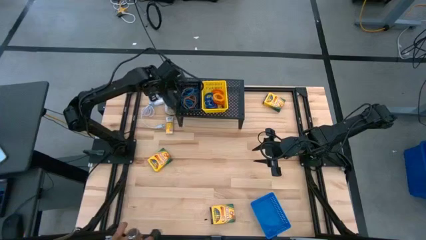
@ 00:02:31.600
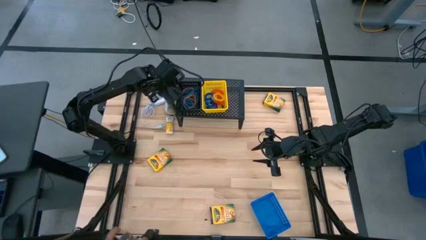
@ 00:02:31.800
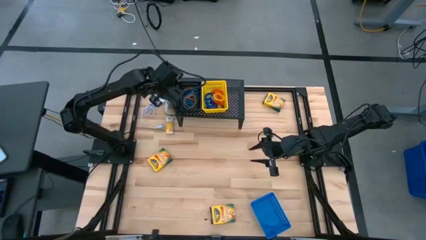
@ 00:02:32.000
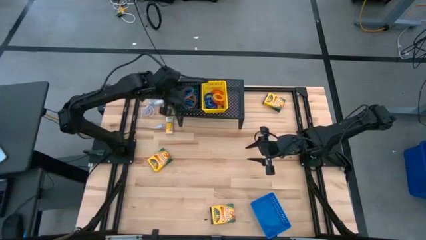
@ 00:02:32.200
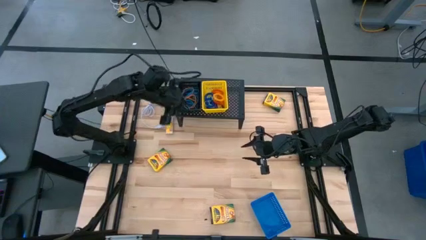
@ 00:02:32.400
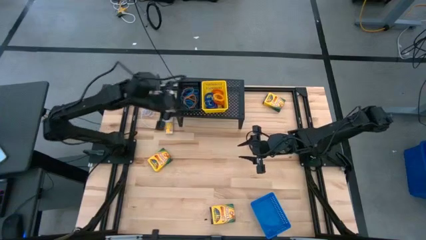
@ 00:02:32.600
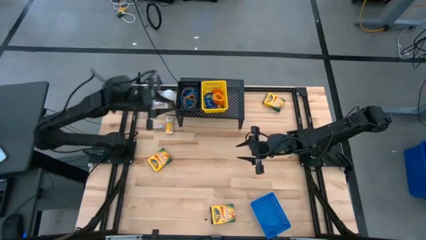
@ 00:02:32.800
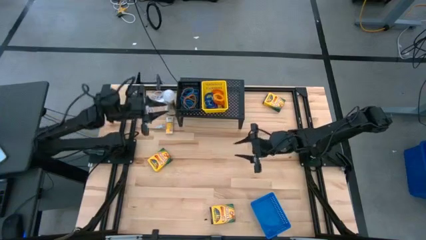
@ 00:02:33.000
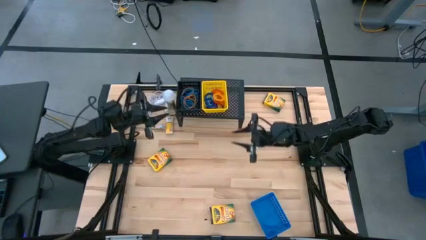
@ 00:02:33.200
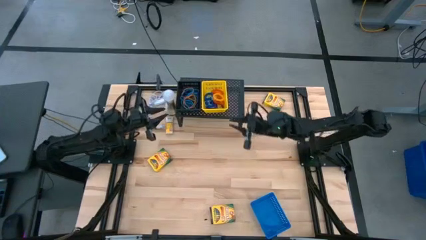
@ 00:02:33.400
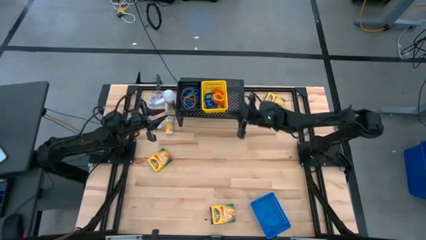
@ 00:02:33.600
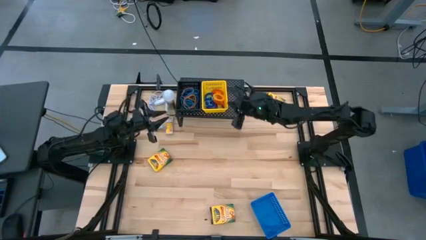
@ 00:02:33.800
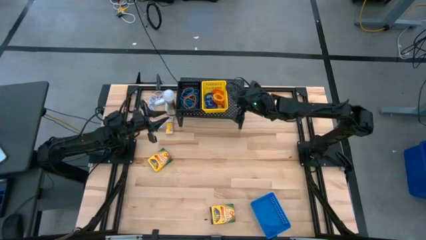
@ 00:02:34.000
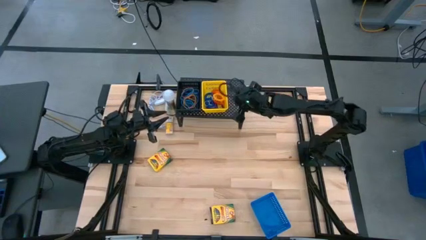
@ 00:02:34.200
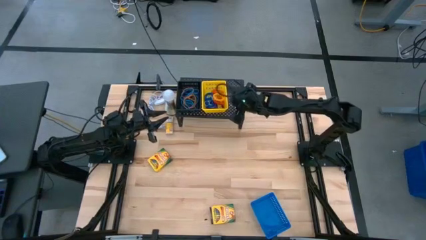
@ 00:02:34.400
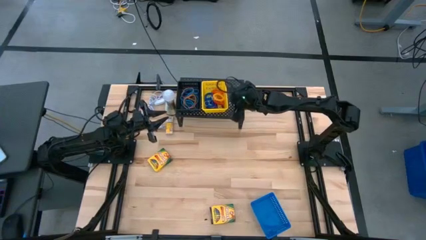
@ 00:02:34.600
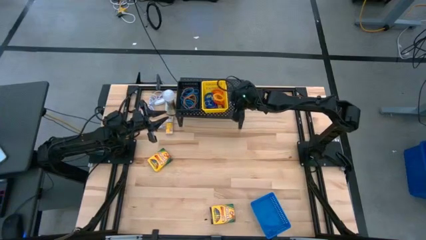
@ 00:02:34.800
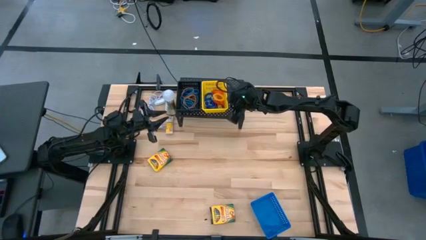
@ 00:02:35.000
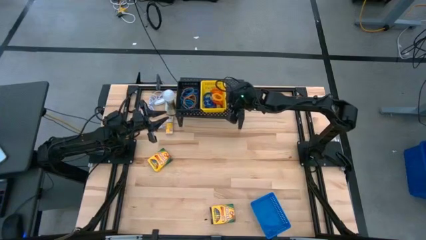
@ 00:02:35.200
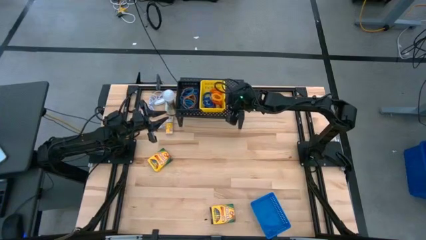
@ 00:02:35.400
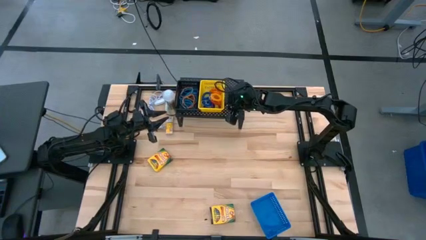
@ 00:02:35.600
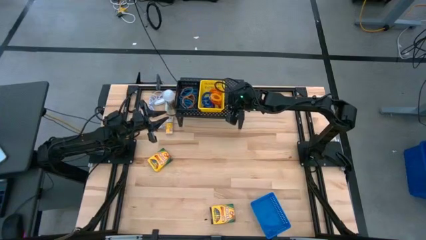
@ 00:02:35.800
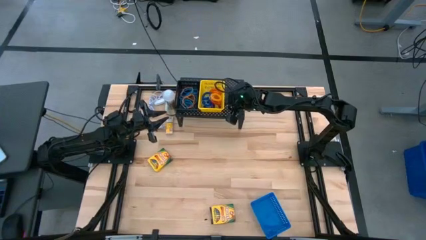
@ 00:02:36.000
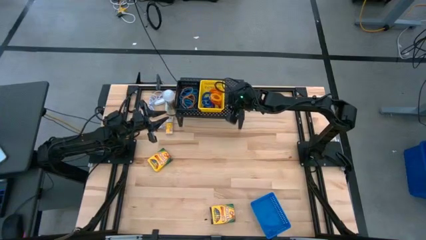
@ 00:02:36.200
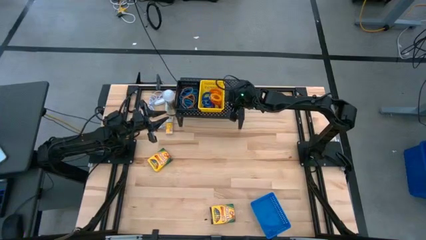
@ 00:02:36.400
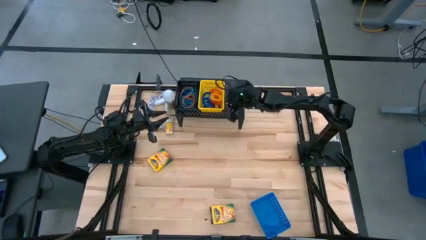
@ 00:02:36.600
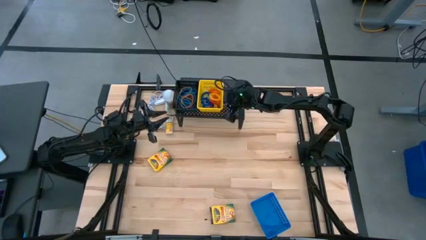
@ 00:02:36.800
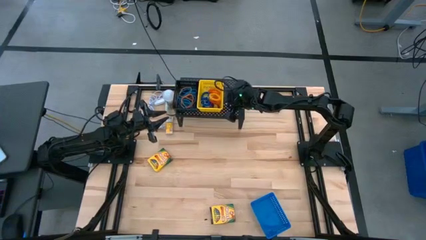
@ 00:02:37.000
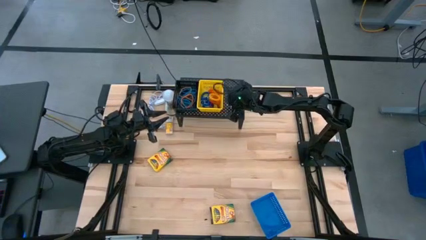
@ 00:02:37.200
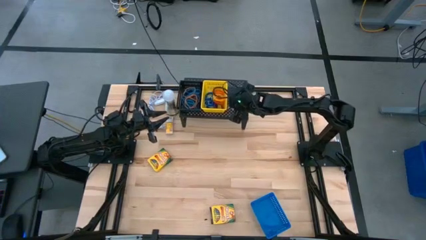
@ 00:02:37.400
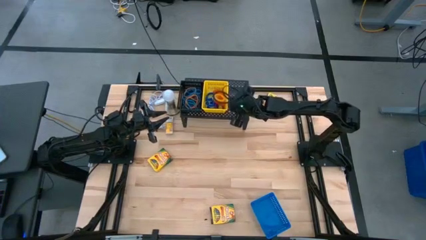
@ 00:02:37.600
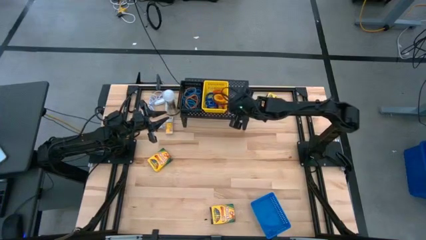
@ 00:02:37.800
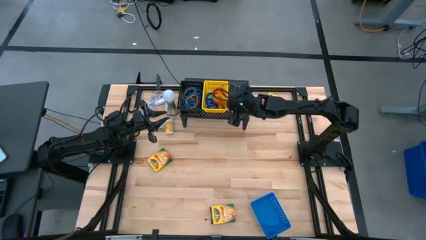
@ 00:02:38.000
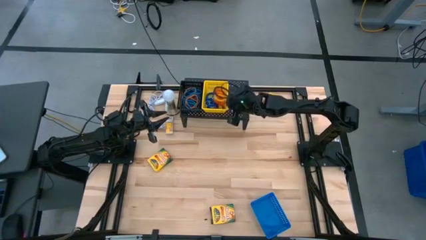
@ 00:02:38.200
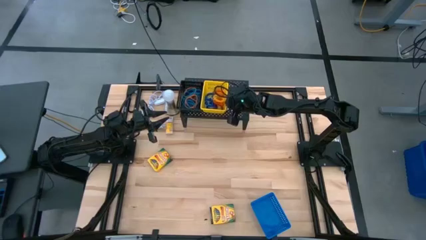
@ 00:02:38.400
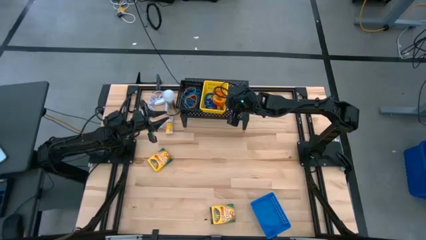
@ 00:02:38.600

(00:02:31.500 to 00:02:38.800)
Task: Pick & Place Office Desk Supplies
Adjust the yellow basket on the shelf

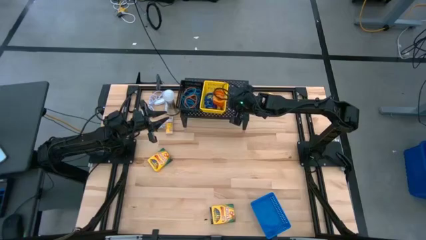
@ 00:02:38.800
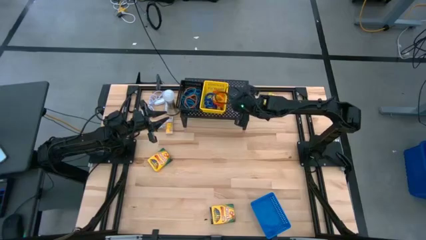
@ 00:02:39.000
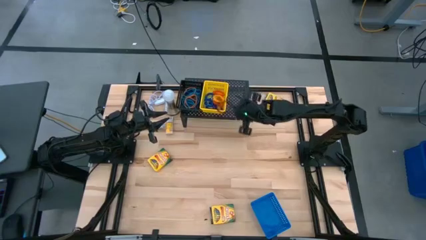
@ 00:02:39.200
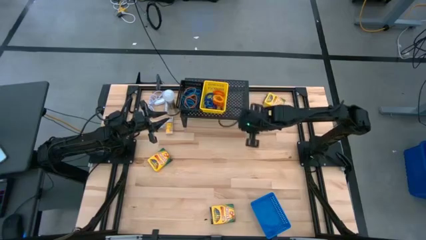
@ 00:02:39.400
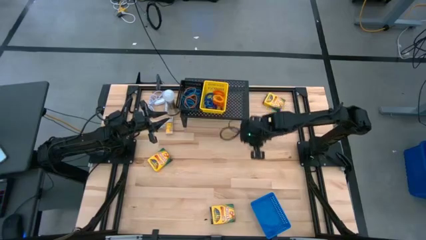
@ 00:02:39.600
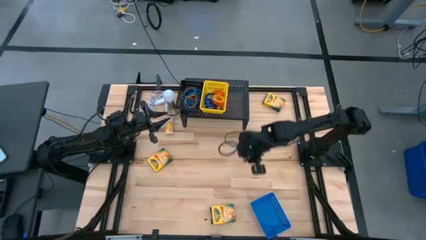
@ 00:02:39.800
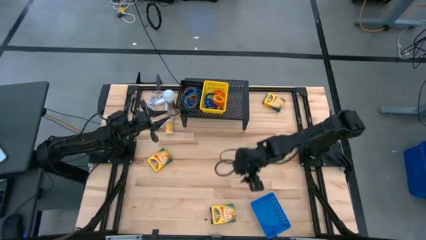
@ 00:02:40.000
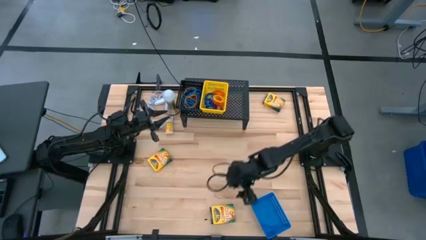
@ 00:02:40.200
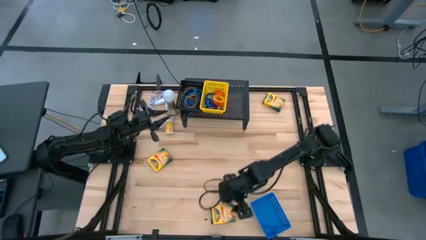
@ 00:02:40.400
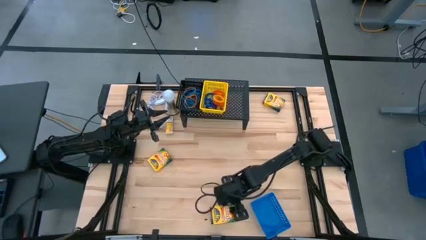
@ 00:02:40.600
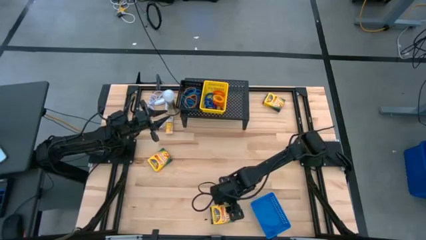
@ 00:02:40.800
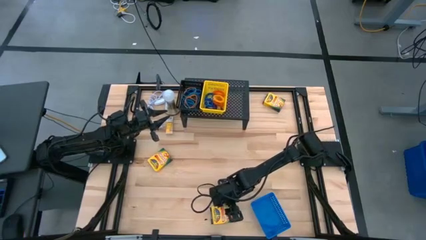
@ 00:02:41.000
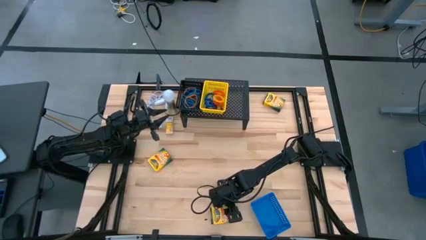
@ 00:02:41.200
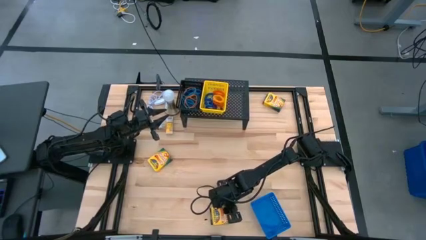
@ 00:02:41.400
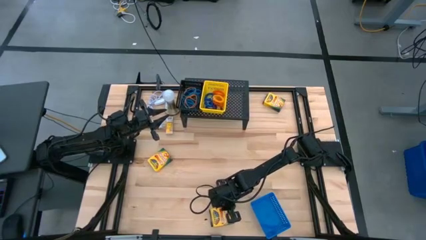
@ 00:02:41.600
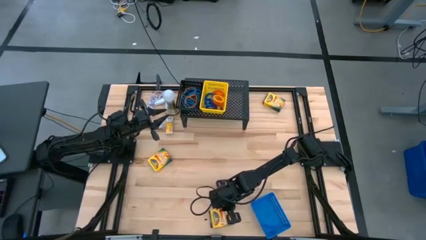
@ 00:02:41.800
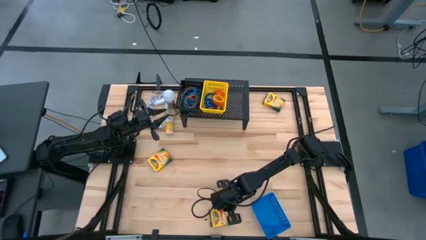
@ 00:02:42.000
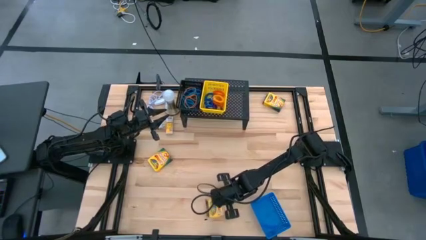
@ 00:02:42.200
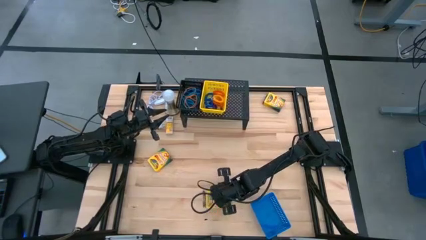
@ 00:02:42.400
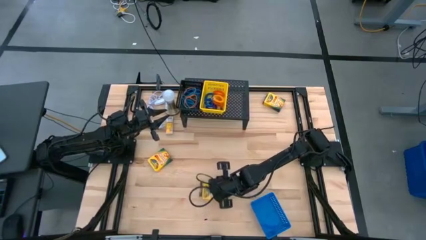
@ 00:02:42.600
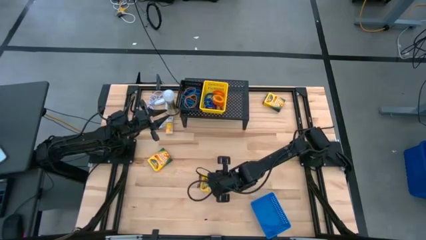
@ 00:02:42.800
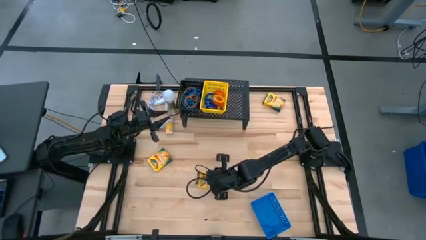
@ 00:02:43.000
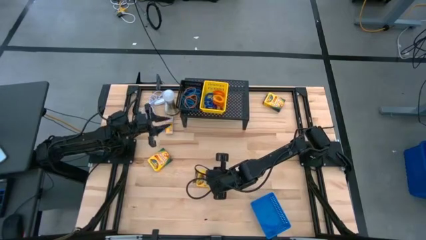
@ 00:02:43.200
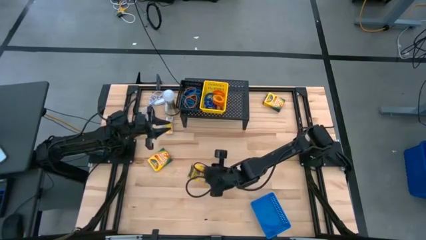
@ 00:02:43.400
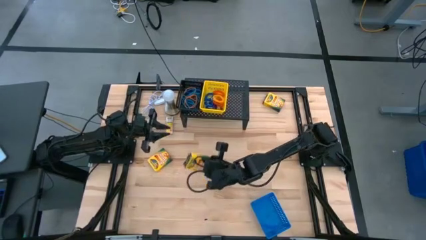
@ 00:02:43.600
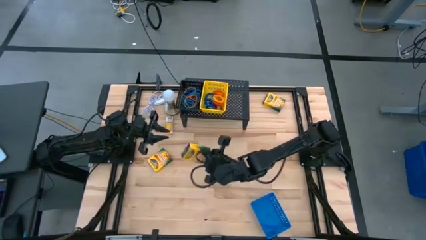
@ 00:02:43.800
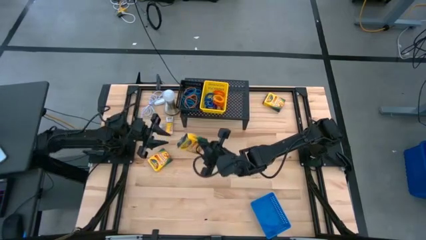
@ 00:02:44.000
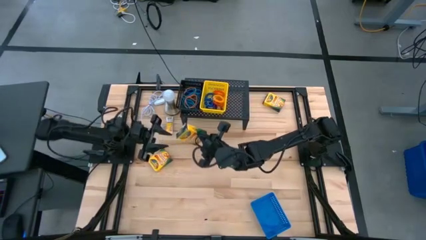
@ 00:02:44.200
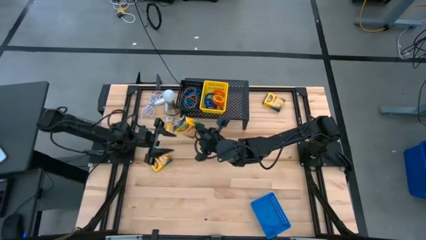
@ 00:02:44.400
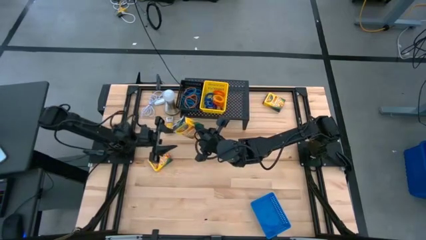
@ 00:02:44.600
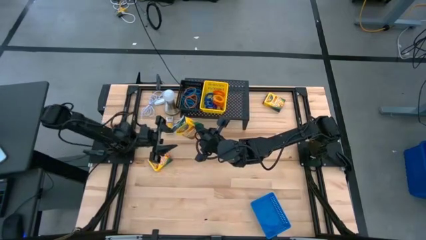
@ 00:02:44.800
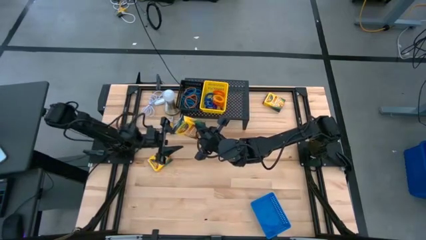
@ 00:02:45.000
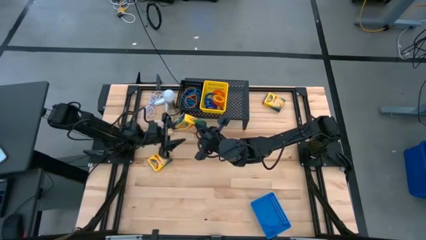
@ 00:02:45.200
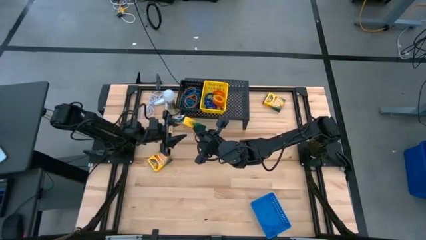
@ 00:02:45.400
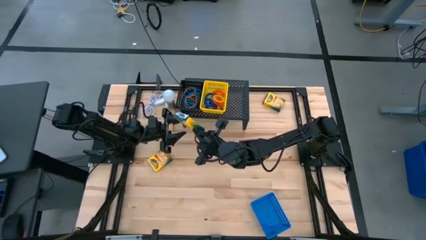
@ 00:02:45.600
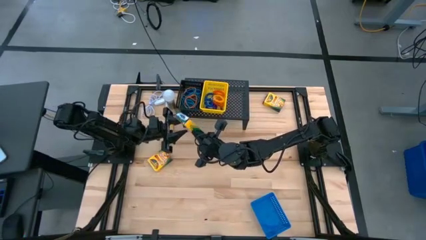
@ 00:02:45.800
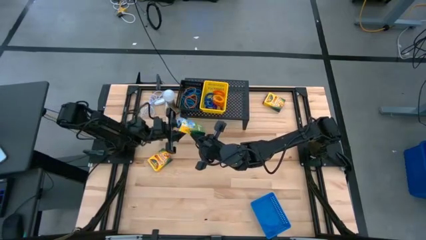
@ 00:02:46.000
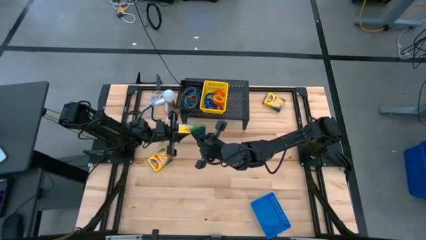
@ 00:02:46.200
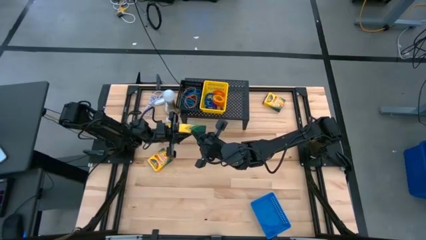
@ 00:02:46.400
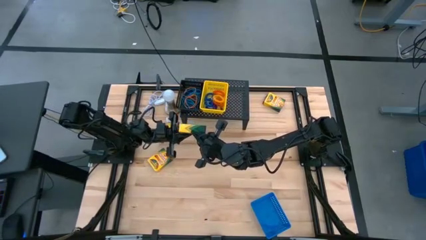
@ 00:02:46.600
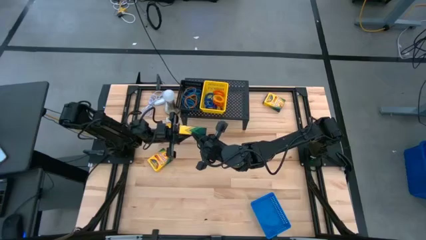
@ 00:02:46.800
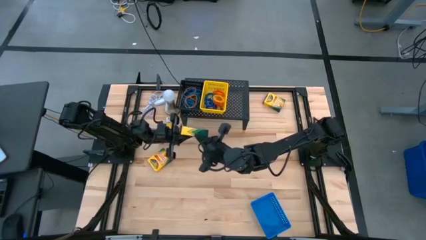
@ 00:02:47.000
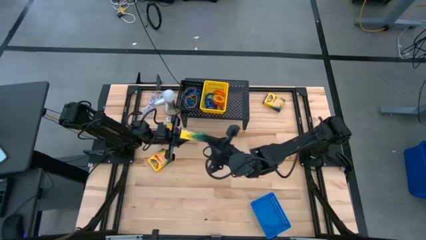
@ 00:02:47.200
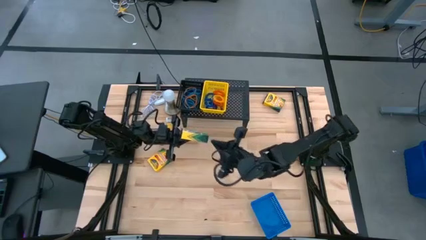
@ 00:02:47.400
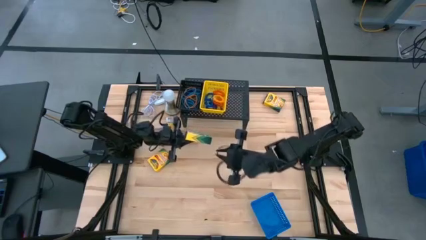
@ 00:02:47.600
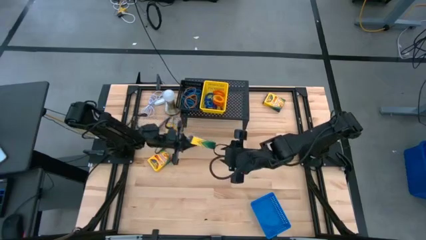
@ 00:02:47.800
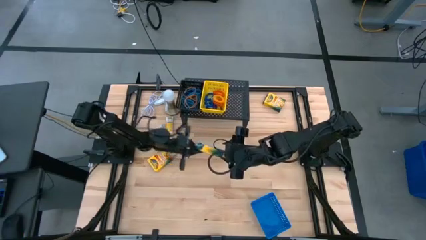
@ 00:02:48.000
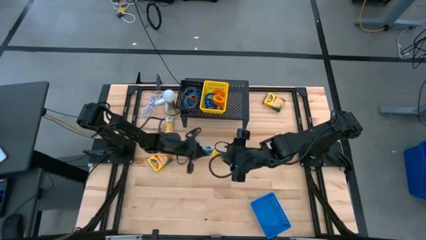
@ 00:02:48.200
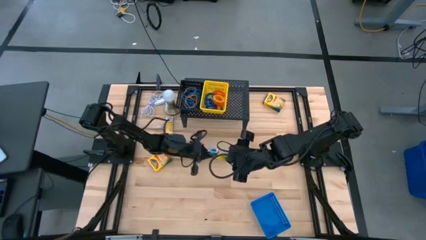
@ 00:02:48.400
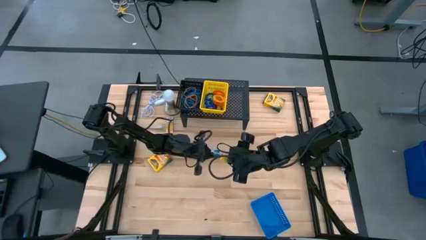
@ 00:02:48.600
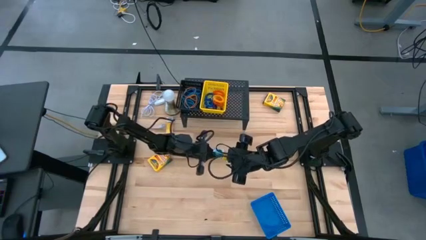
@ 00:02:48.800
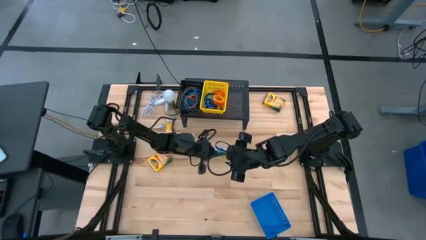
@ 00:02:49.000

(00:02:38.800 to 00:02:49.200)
Put the big yellow crayon box into the blue basket
